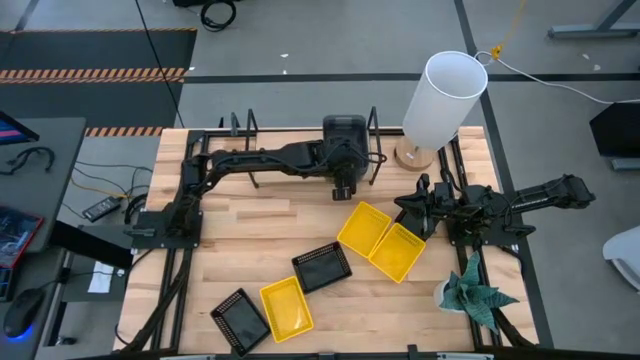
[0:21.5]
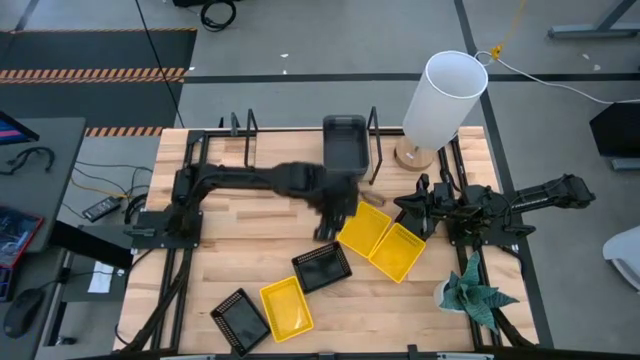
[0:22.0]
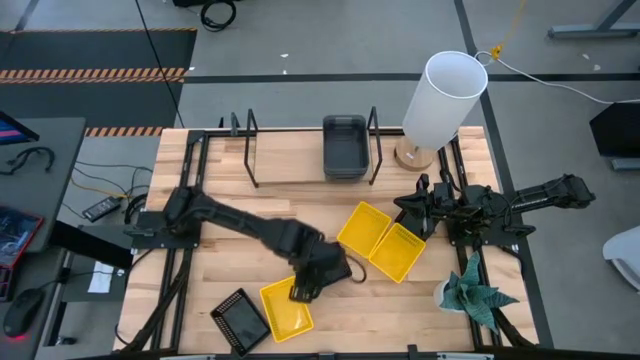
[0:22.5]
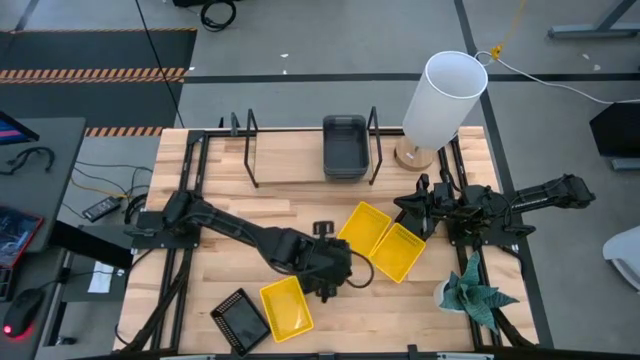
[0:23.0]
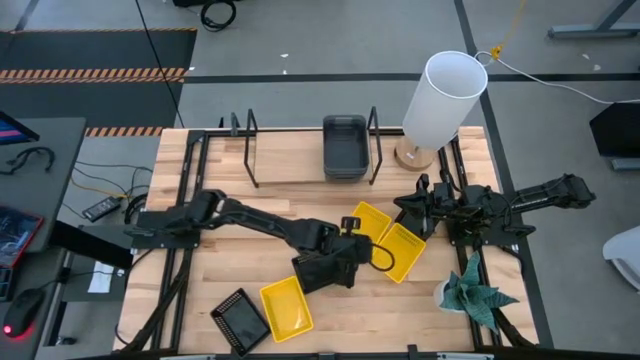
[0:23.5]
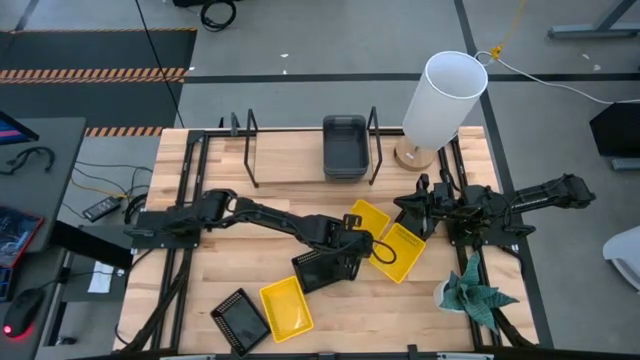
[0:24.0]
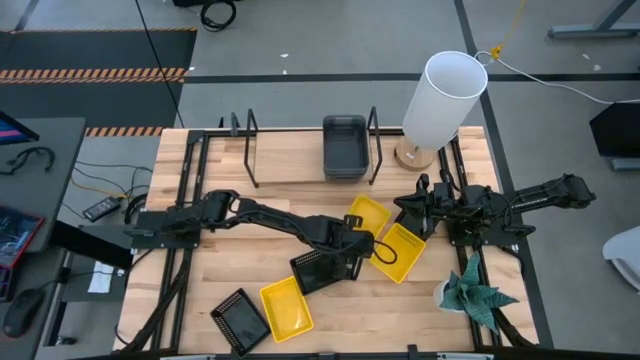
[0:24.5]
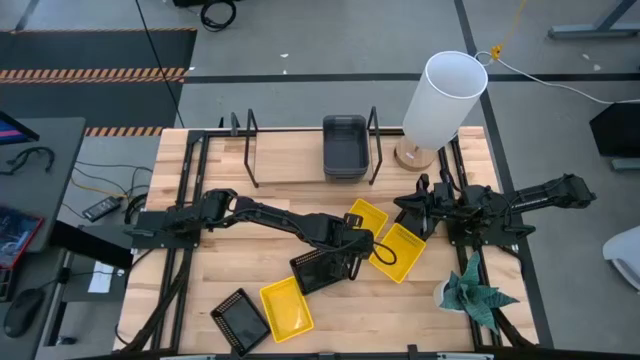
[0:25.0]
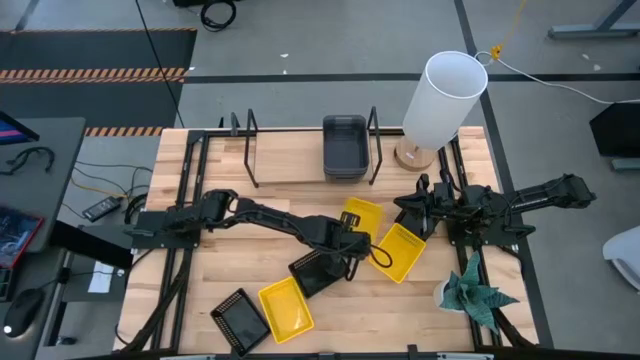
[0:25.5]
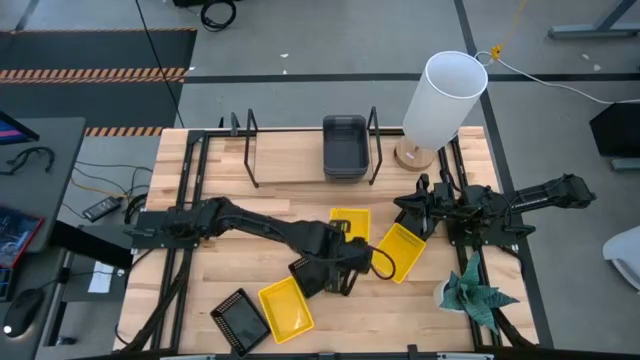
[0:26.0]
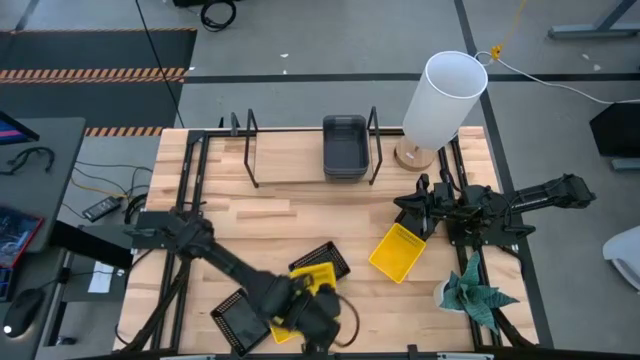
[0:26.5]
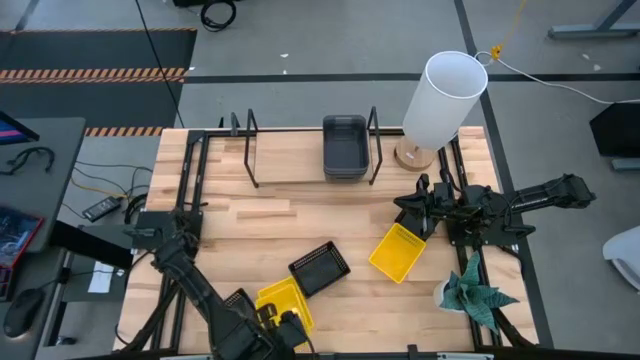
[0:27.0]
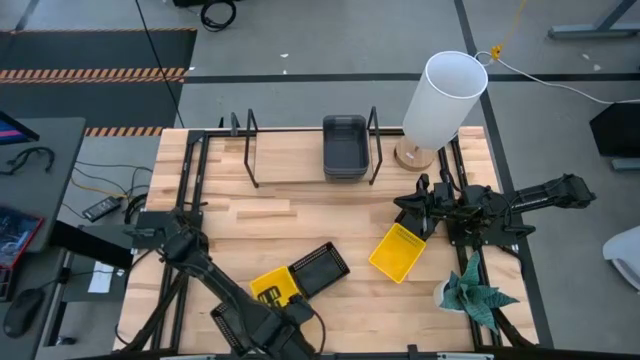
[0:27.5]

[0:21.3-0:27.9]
Task: Stack baskets on shelf by color
Stack the top left yellow bin on top of the bottom yellow bin

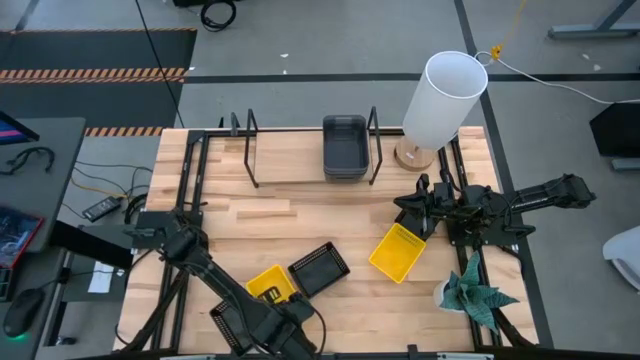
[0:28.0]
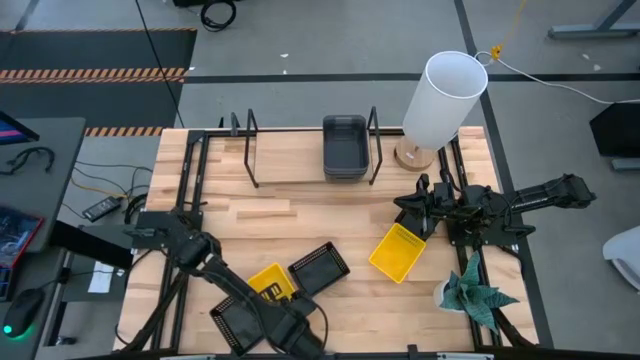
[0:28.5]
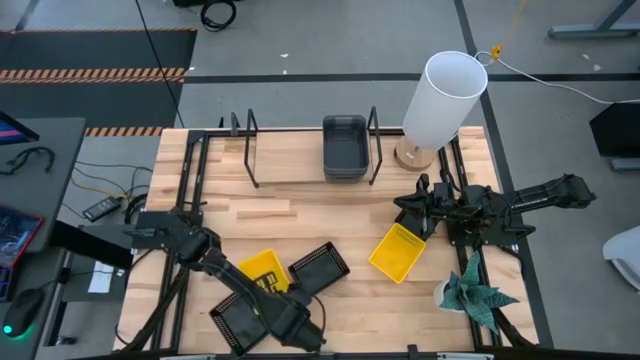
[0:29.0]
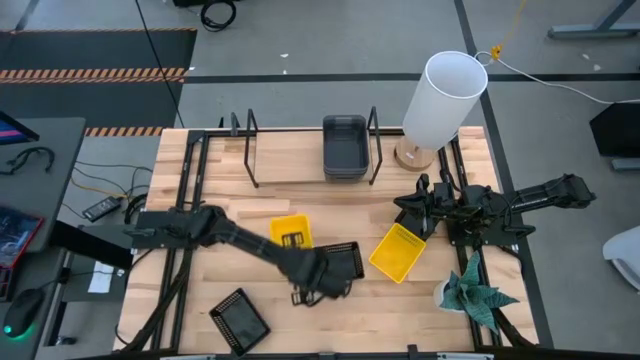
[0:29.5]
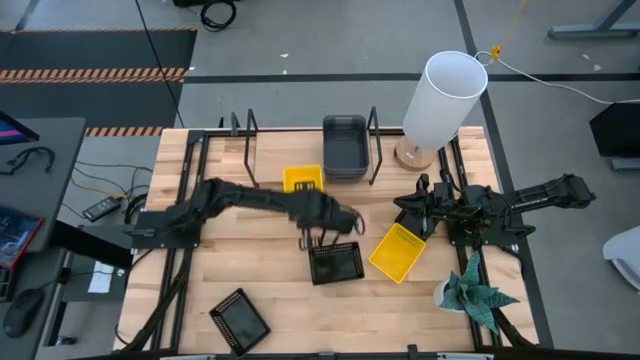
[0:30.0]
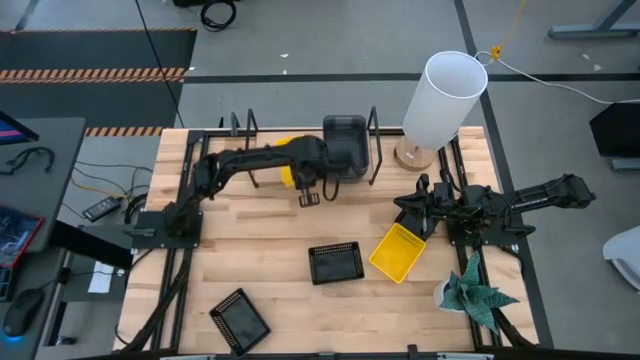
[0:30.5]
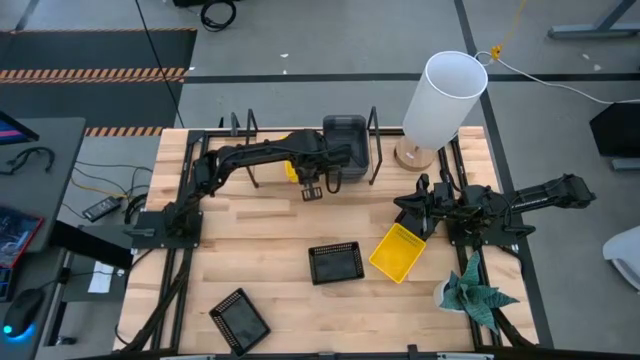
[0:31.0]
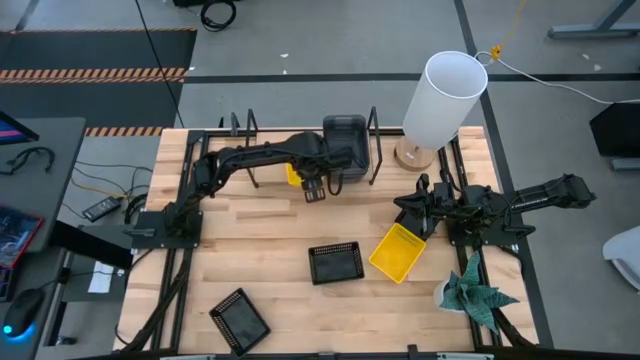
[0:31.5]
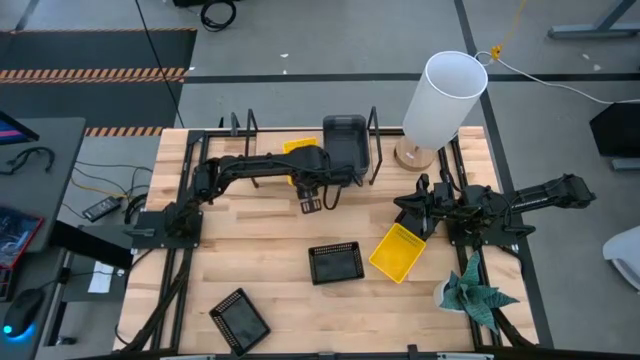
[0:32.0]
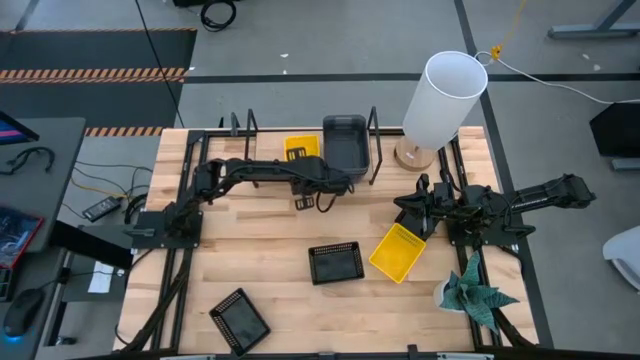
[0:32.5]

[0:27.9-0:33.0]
Put the bottom stacked yellow bins on the shelf

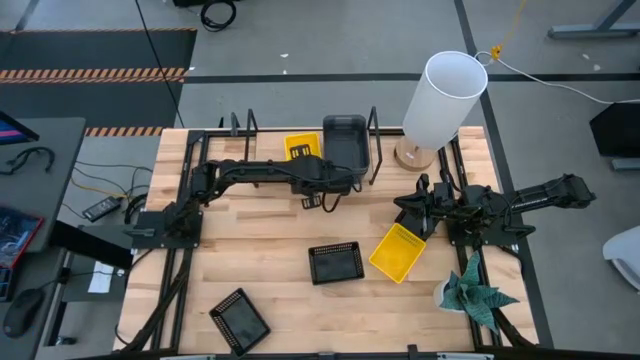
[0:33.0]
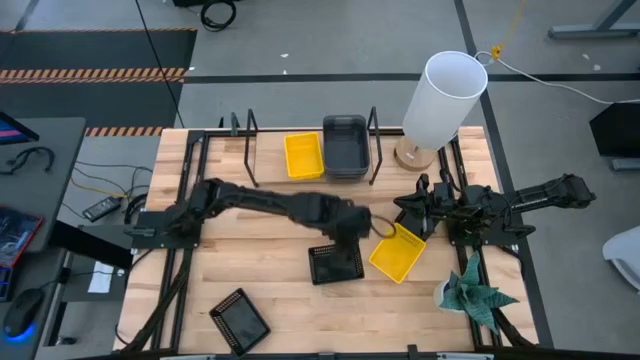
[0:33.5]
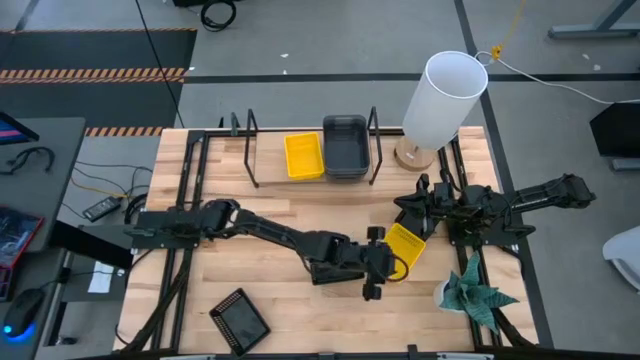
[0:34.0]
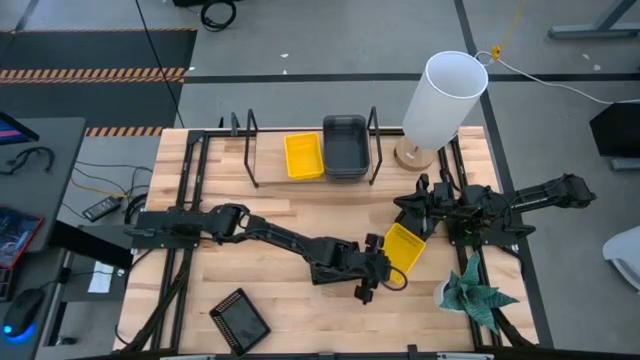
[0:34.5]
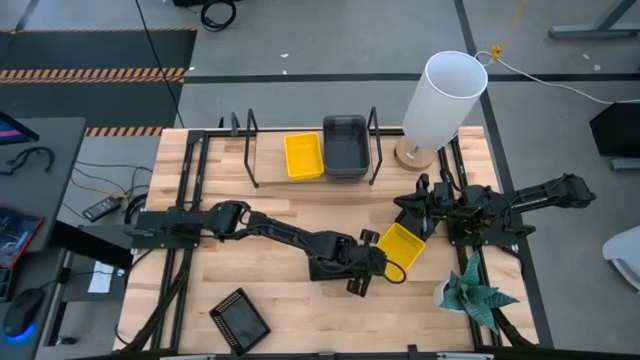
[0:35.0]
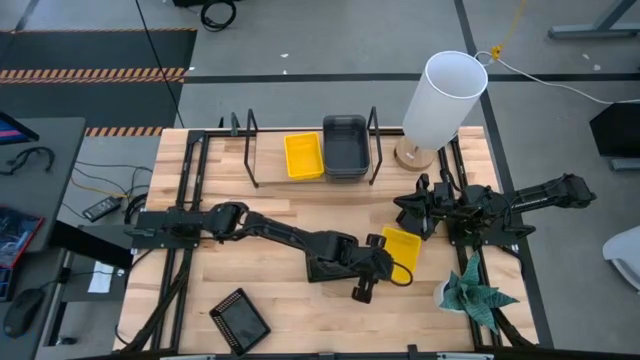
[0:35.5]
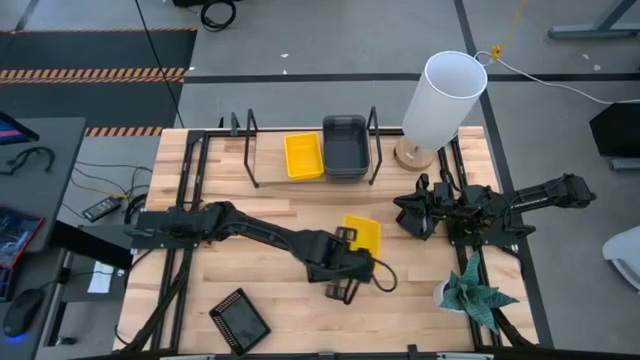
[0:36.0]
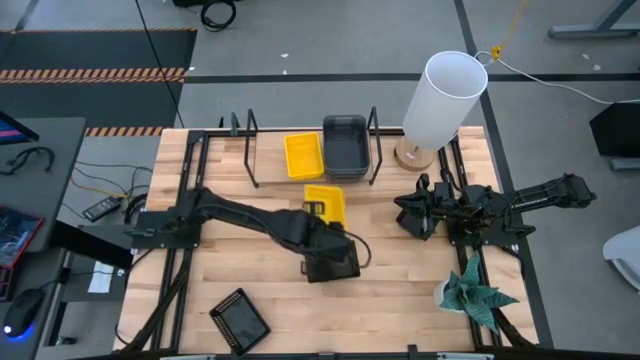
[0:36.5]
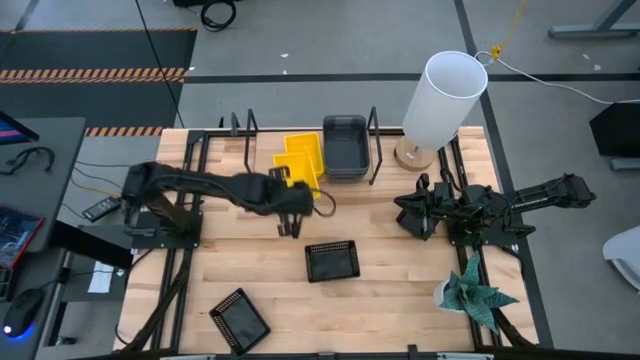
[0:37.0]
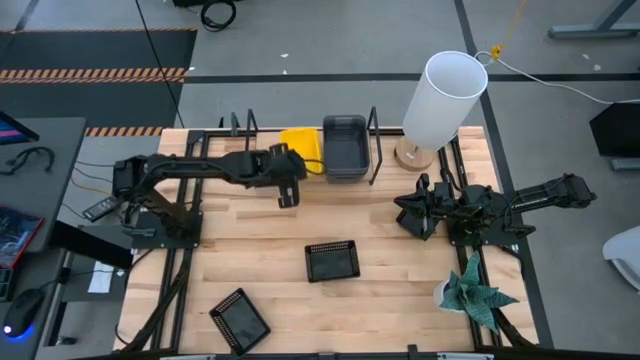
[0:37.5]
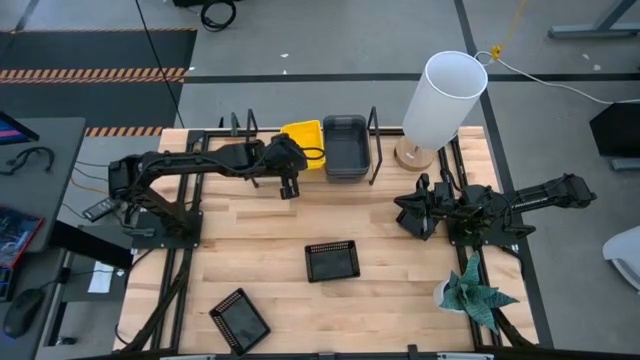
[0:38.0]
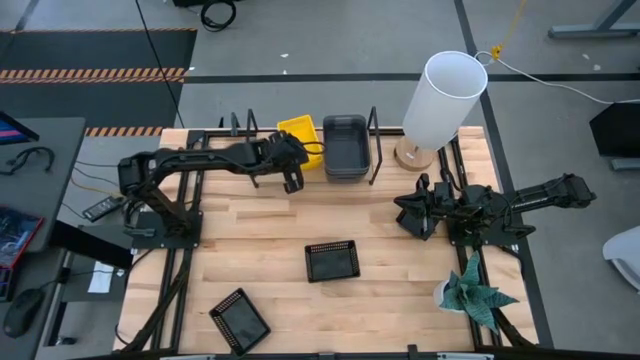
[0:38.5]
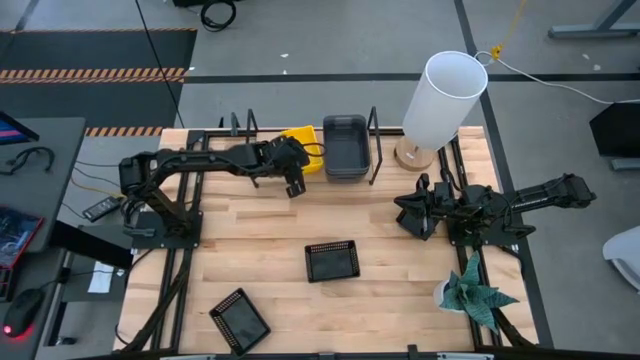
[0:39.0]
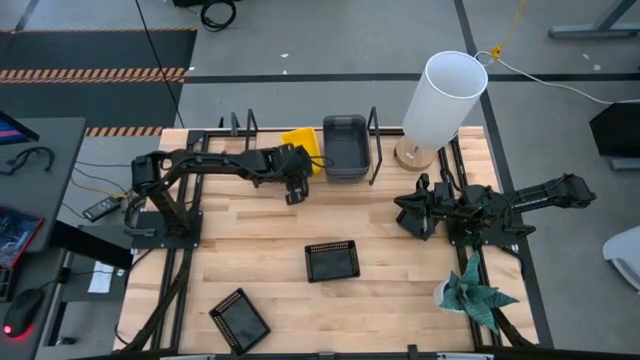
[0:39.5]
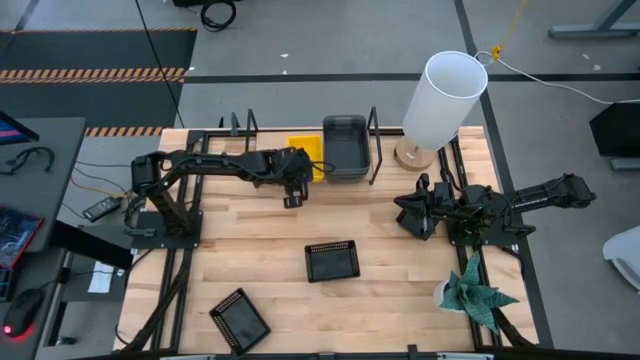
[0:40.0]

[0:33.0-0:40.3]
Stack the yellow bin on top of the yellow bins on the shelf

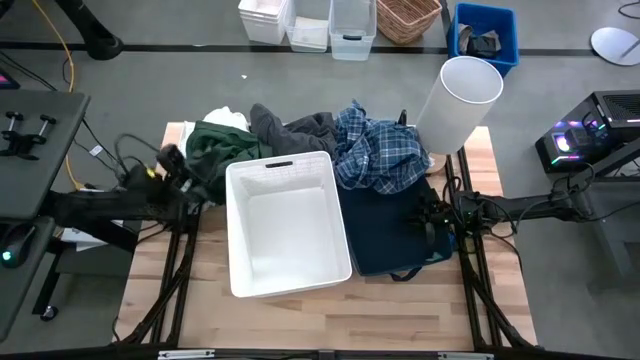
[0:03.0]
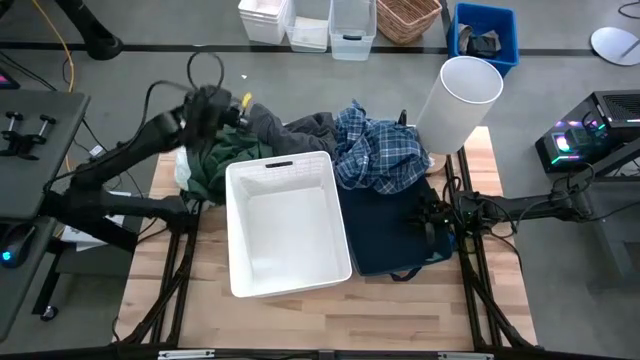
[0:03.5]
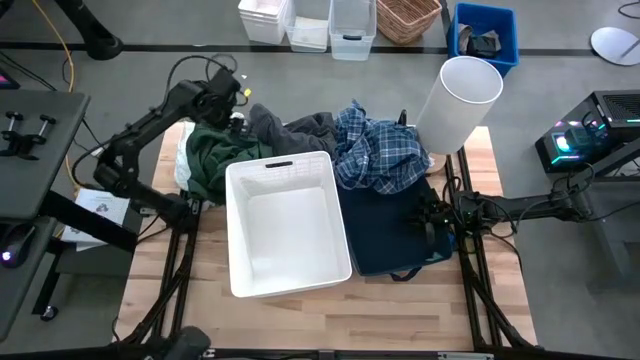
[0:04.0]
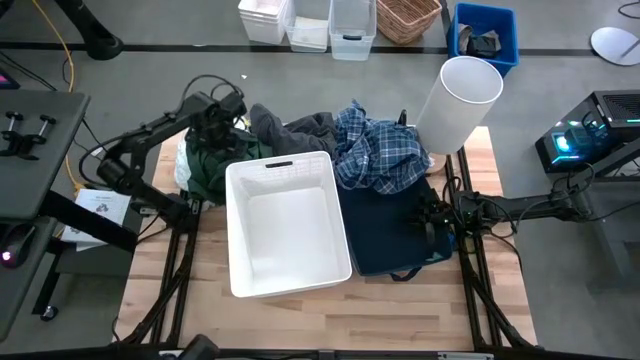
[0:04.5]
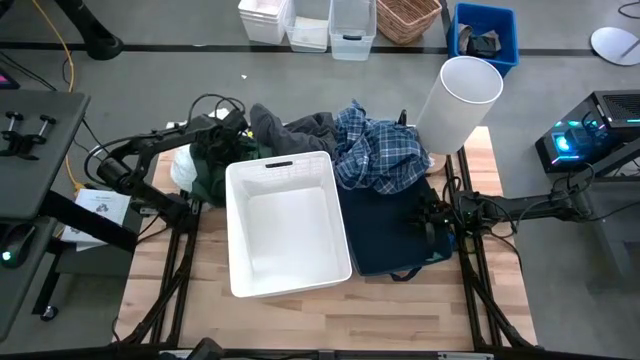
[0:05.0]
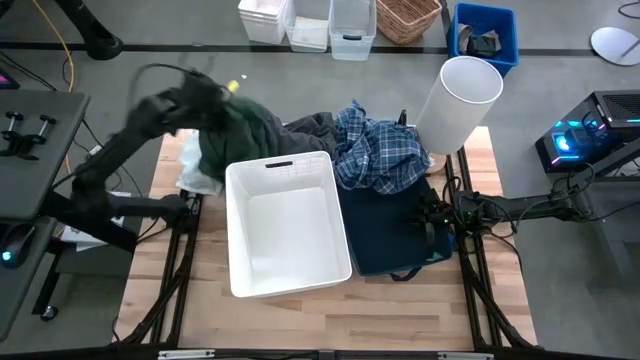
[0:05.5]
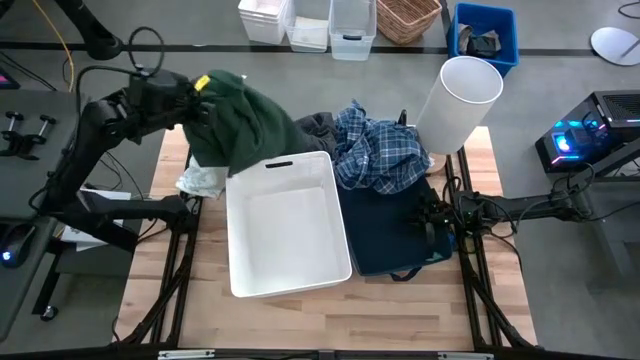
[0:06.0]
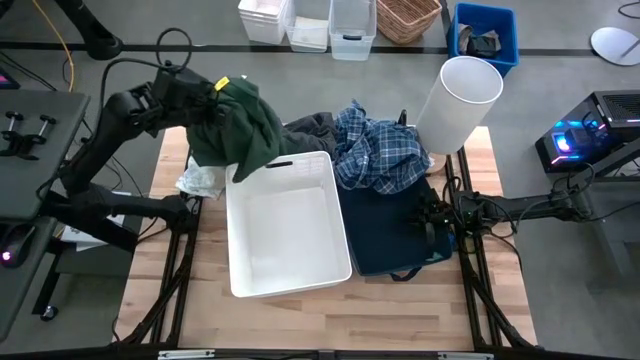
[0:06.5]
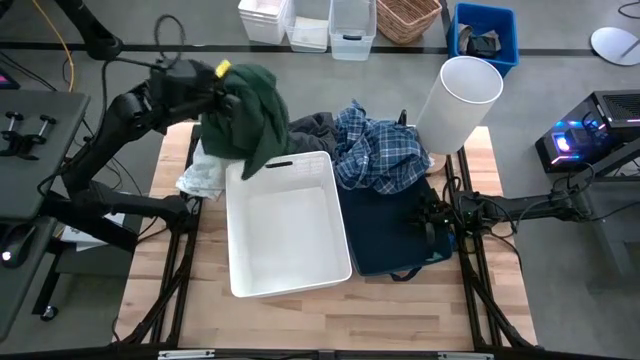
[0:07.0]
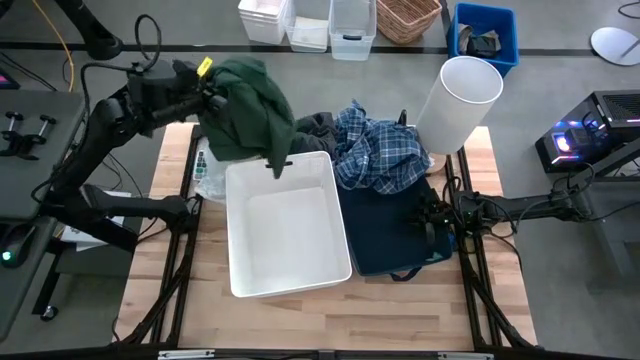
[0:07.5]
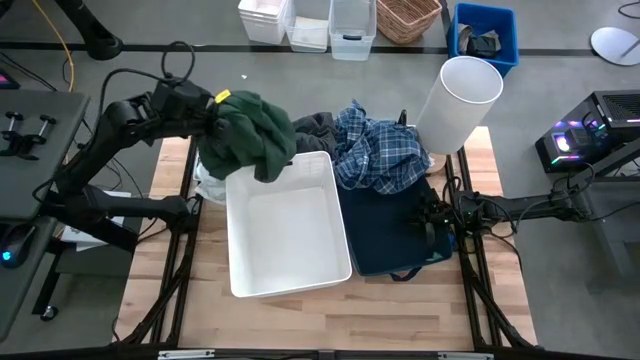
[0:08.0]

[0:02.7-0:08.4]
Task: Sort clothes
Put the green shirt into the white laundry bin
